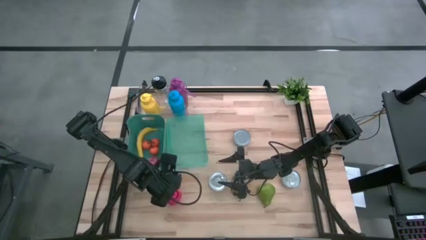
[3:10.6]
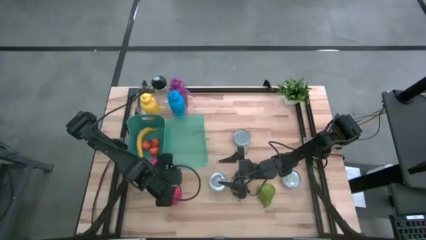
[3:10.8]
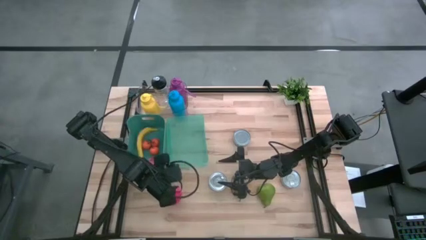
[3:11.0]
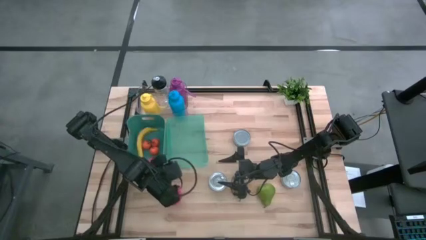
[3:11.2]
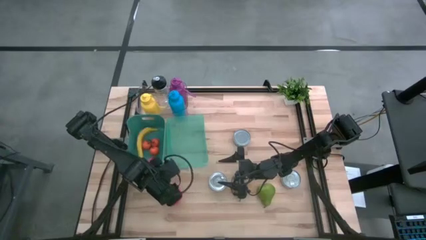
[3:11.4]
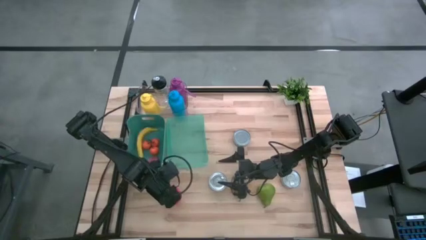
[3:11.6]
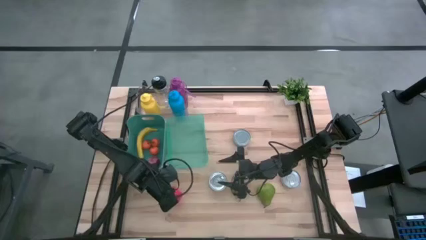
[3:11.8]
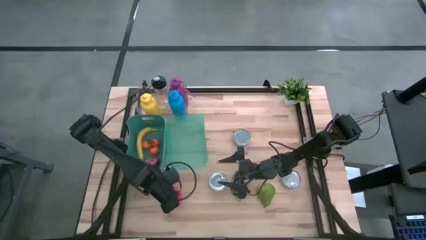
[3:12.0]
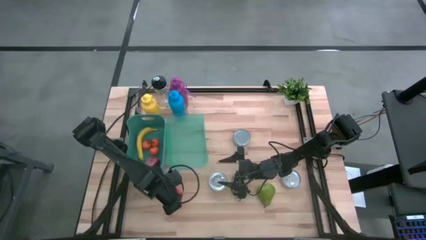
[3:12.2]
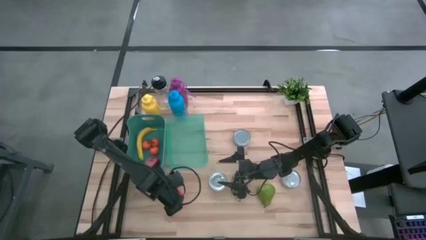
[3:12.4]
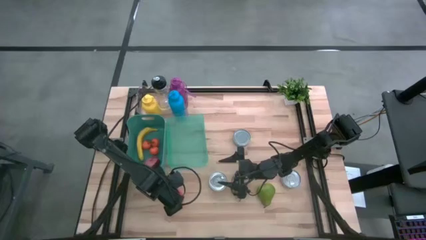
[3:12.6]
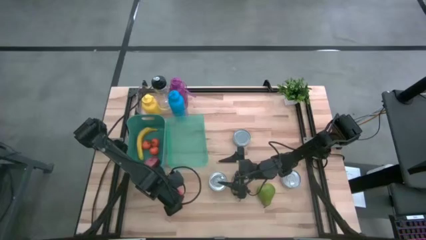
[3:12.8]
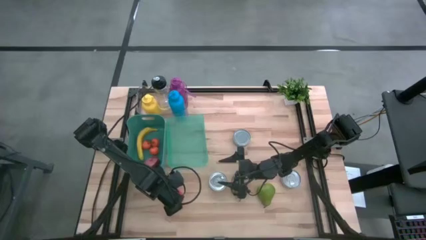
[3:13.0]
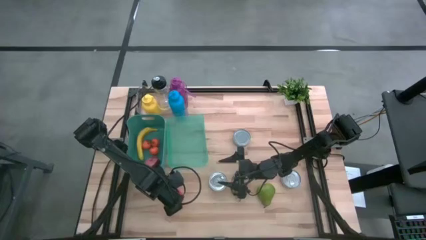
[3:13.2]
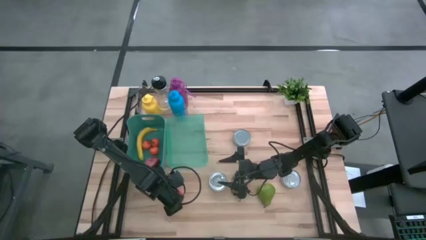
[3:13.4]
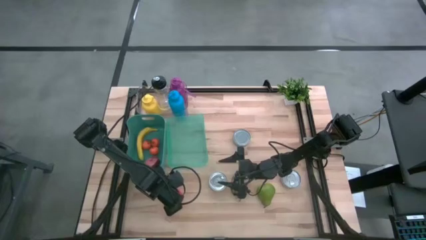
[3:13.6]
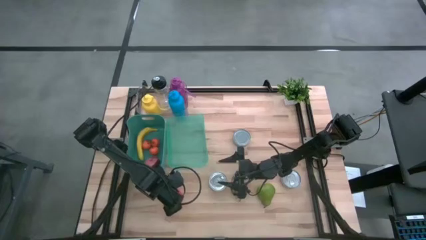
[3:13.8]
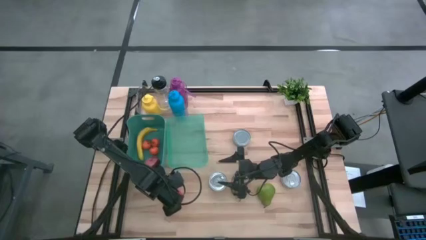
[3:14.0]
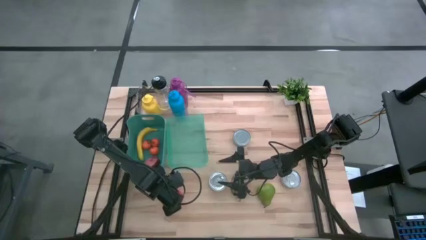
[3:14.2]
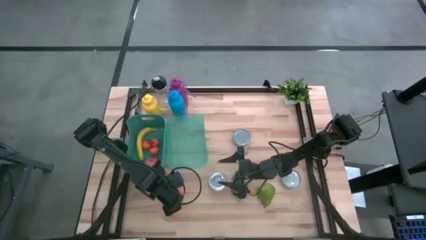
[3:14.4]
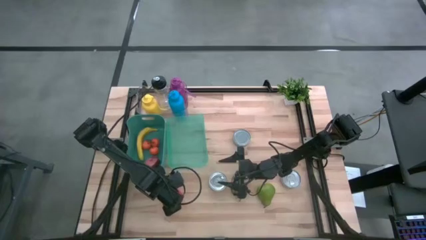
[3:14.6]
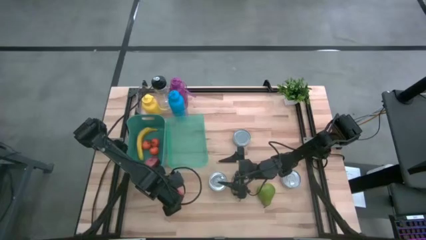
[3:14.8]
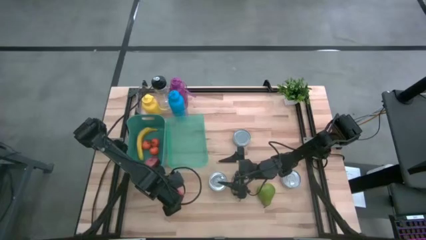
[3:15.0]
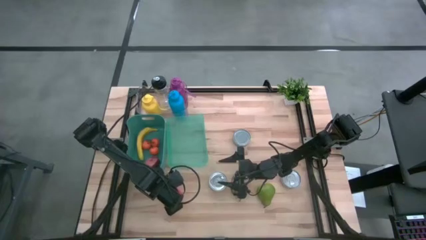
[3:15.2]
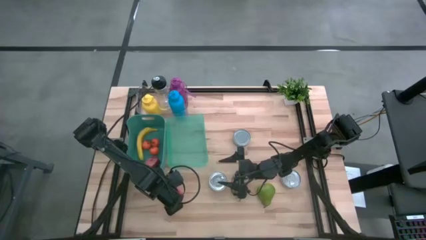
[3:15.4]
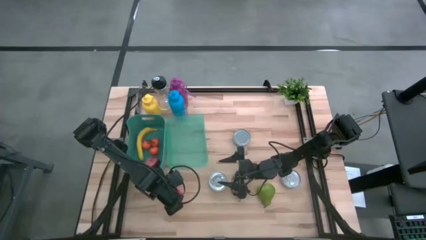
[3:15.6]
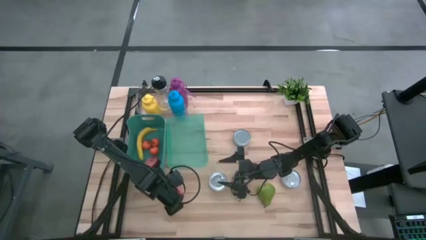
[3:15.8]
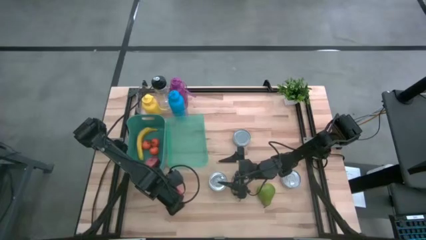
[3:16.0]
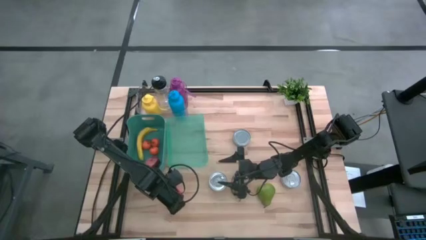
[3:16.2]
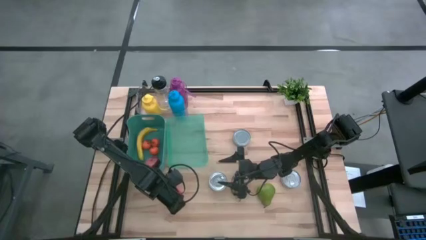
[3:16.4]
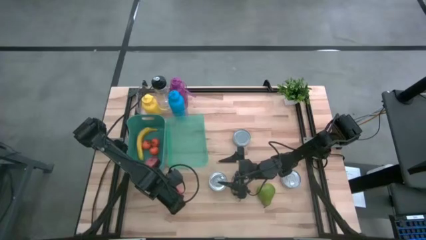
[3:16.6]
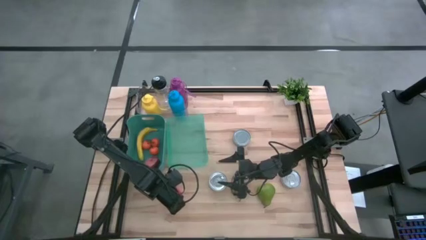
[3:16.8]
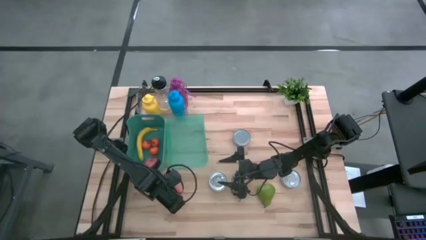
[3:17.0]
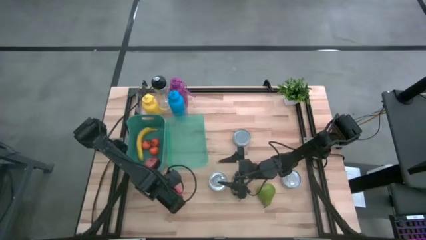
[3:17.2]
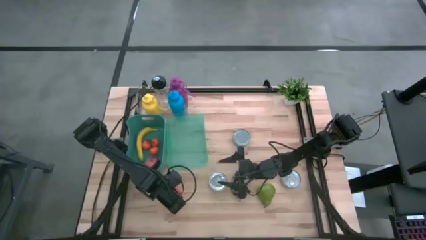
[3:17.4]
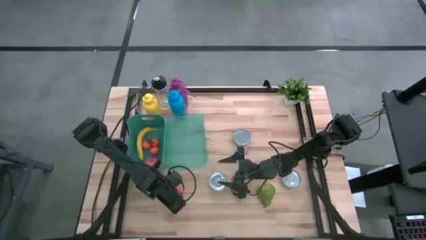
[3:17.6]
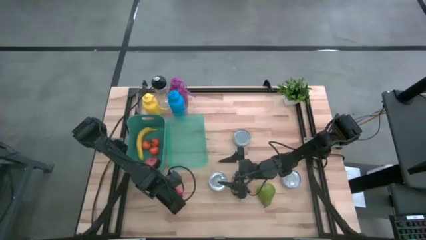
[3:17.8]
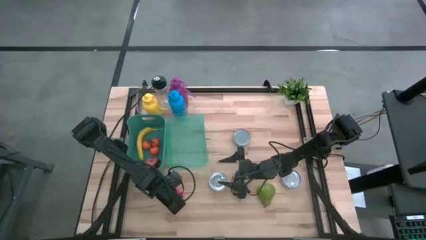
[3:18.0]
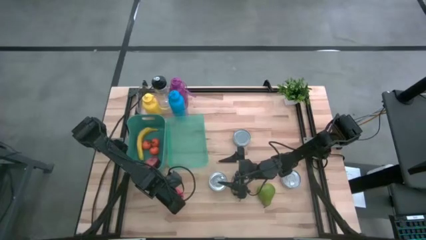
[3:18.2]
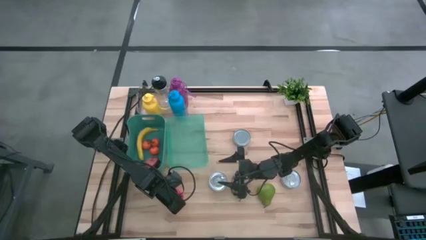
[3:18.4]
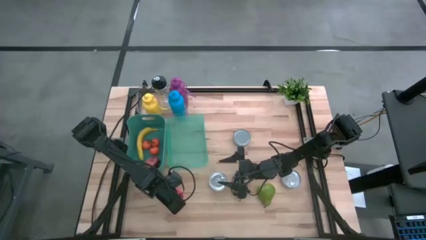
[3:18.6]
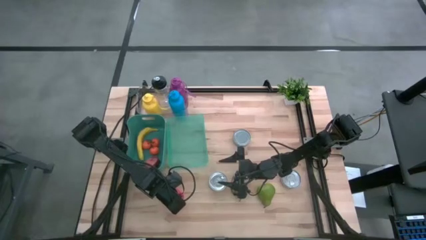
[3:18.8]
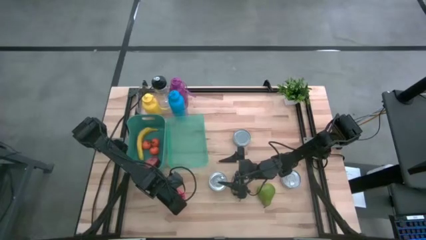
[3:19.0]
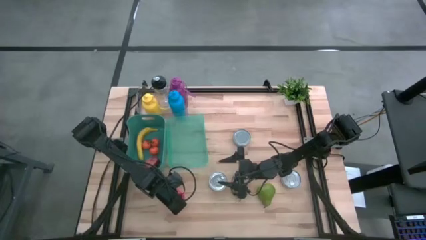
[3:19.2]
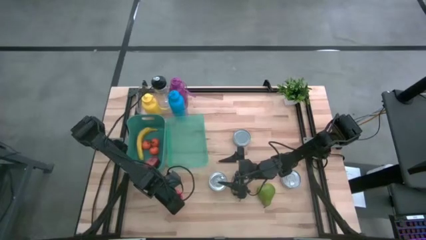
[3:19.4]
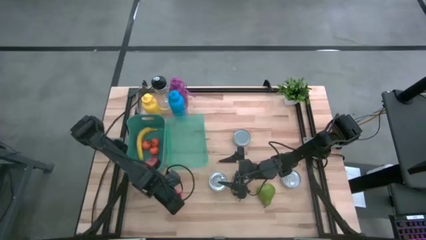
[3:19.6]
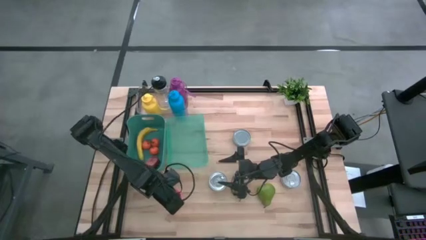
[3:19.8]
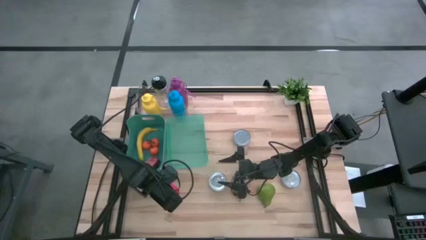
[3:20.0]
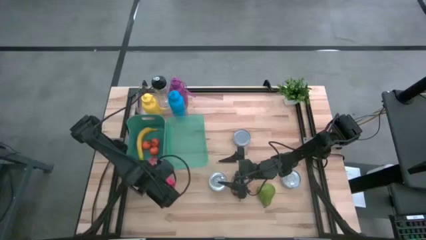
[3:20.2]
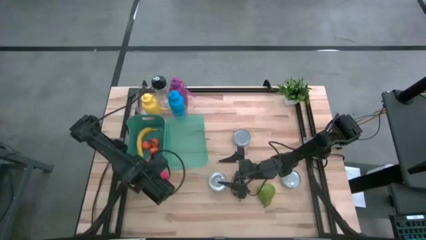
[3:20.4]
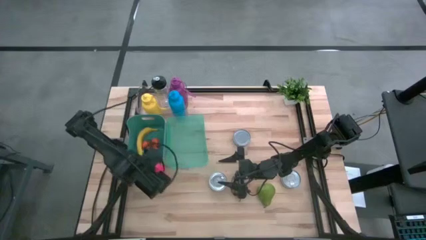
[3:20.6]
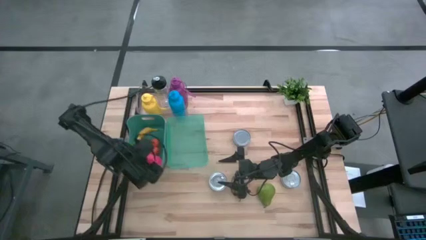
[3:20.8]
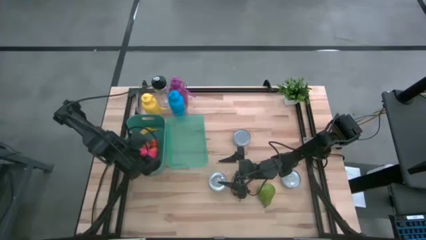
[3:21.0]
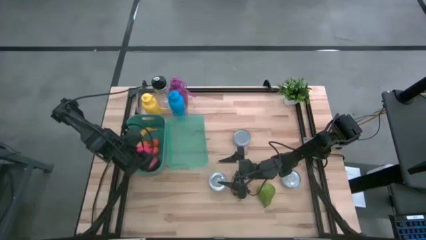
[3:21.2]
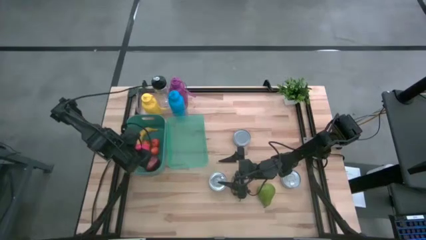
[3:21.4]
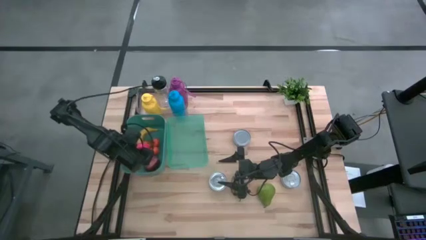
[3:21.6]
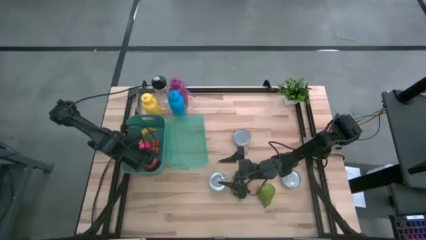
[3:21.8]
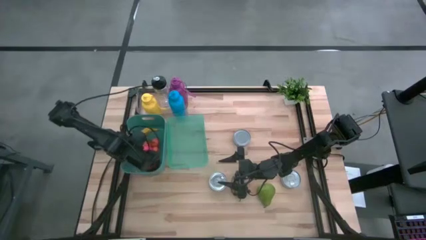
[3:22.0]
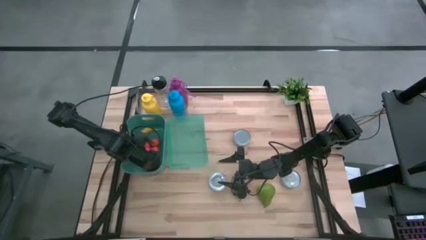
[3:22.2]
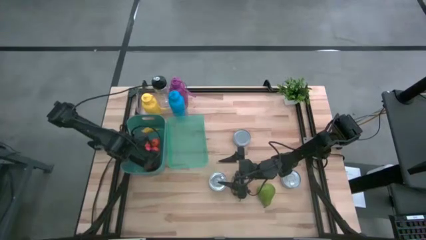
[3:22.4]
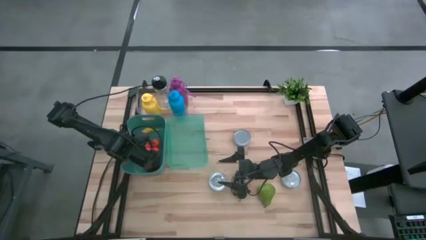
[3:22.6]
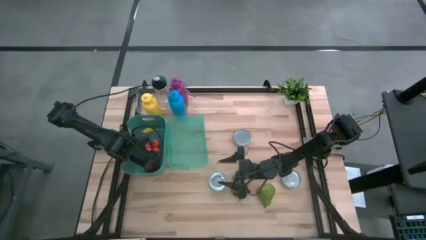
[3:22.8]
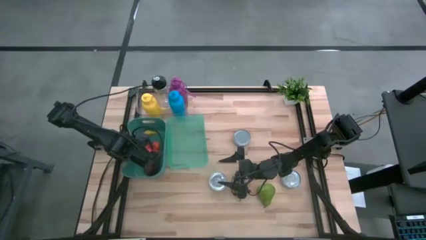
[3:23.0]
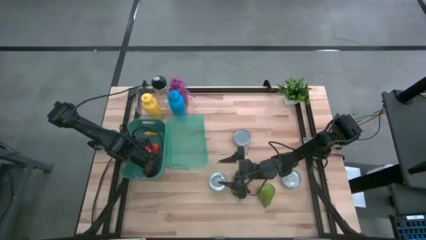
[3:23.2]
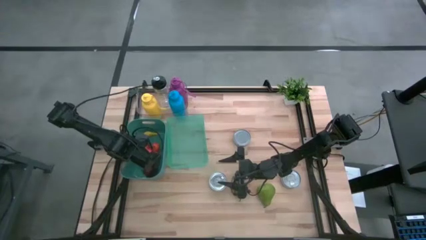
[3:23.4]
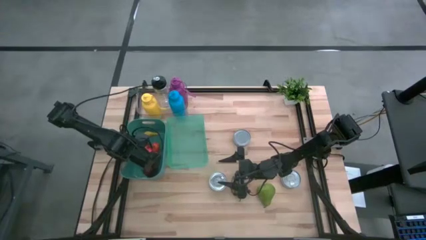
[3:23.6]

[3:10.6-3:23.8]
Task: Pick & Place Food Item
Put the red apple into the green bin
